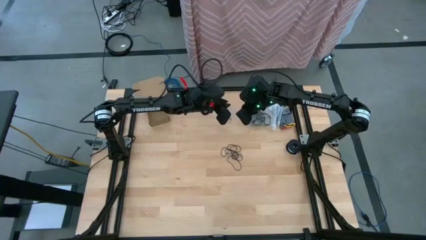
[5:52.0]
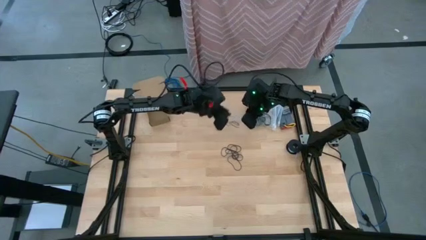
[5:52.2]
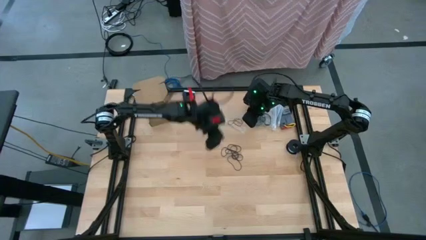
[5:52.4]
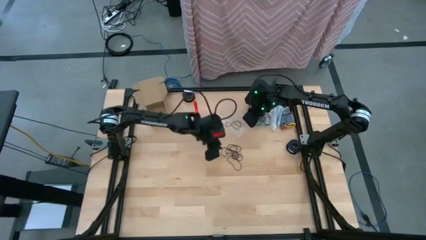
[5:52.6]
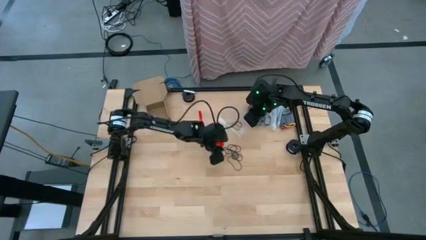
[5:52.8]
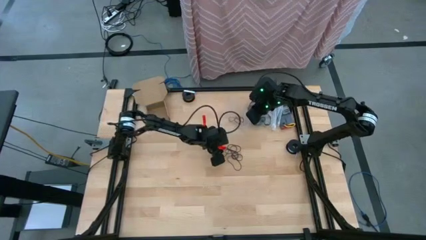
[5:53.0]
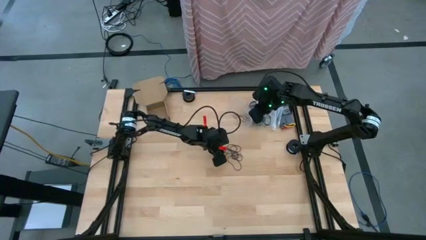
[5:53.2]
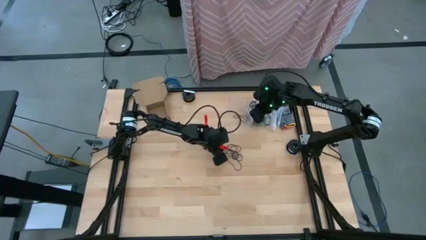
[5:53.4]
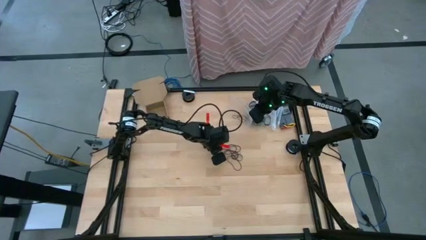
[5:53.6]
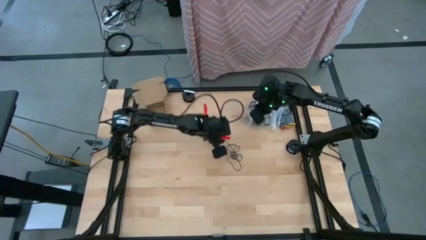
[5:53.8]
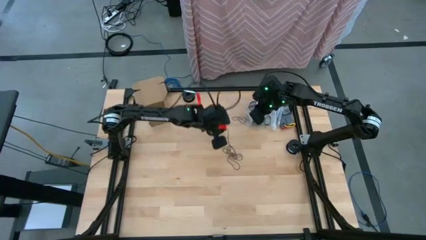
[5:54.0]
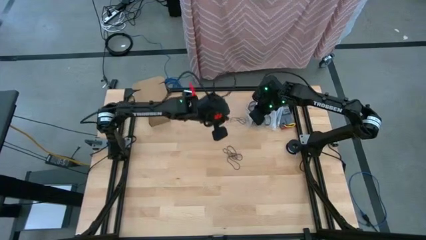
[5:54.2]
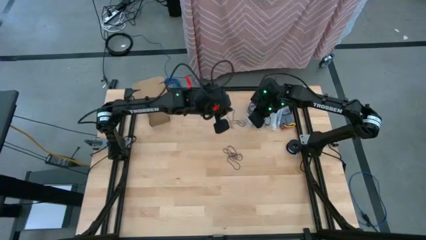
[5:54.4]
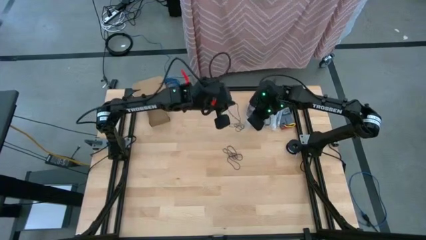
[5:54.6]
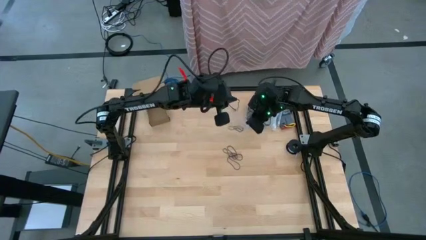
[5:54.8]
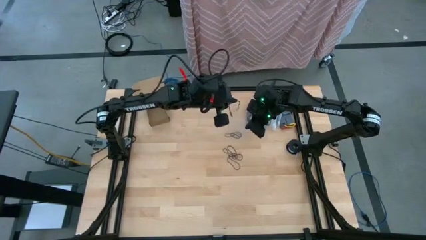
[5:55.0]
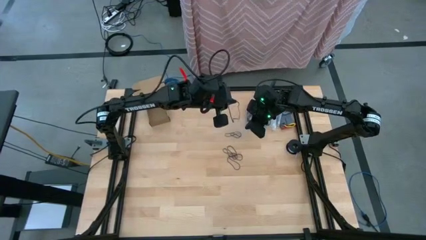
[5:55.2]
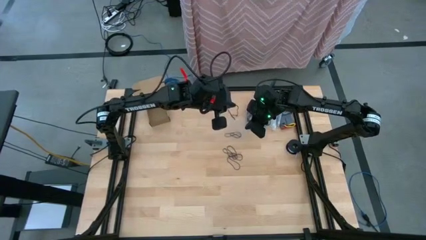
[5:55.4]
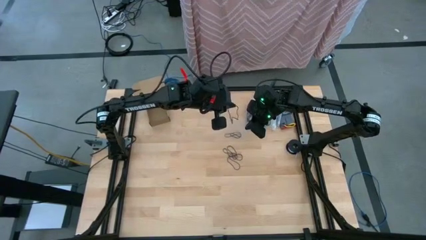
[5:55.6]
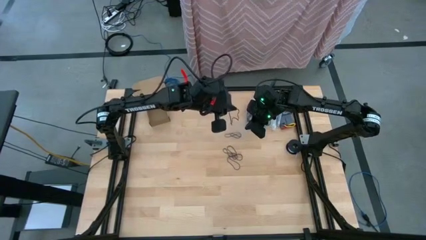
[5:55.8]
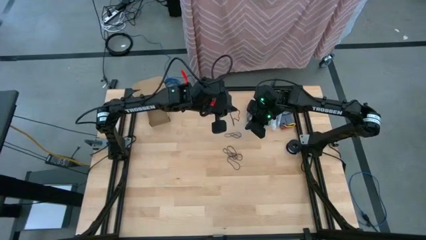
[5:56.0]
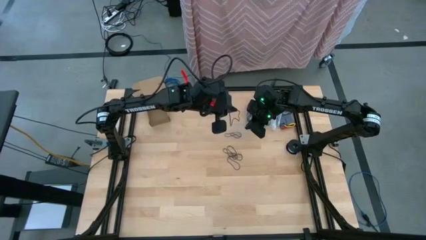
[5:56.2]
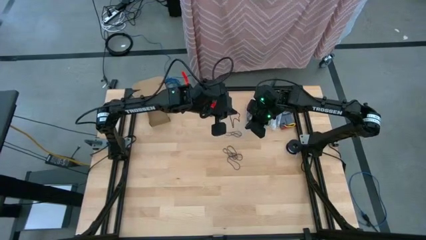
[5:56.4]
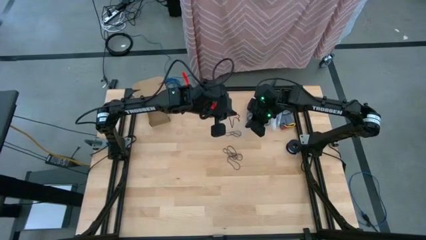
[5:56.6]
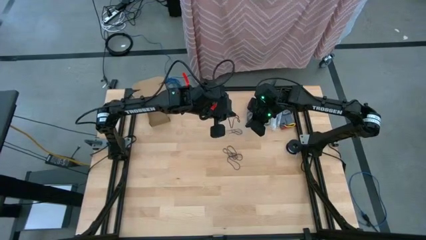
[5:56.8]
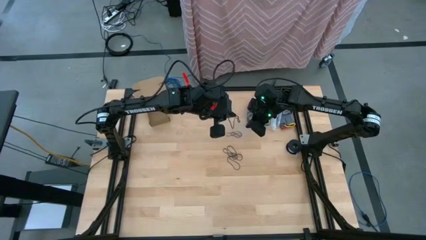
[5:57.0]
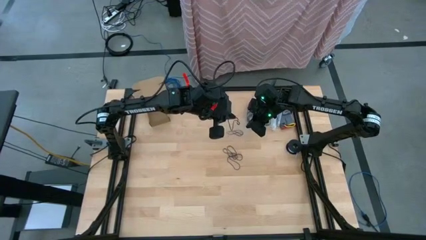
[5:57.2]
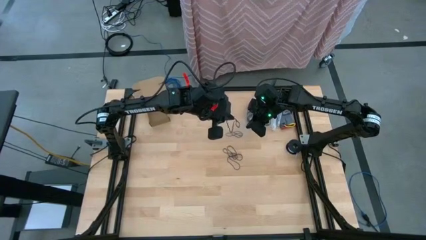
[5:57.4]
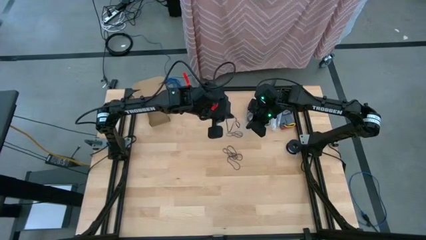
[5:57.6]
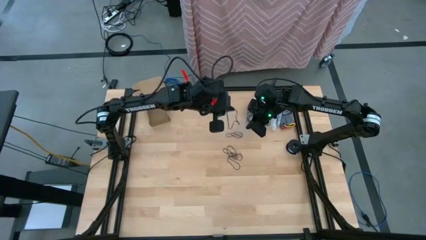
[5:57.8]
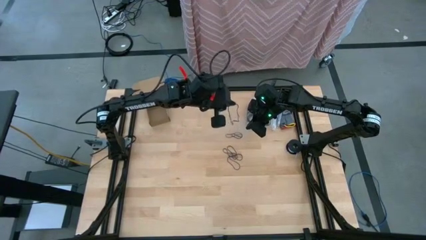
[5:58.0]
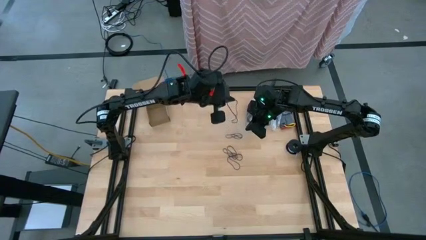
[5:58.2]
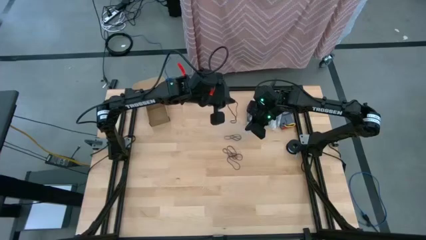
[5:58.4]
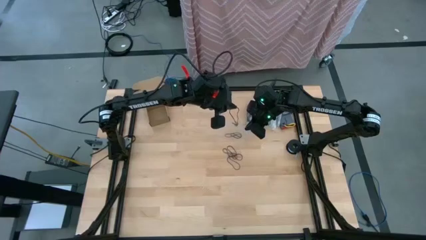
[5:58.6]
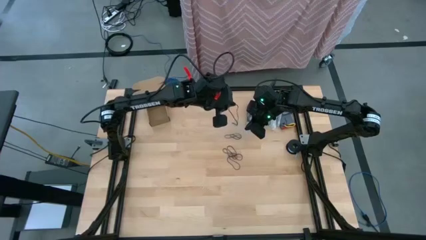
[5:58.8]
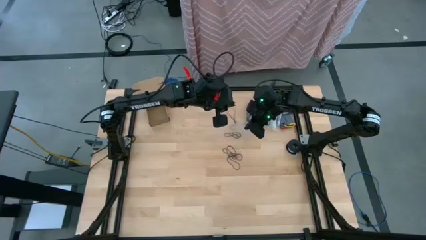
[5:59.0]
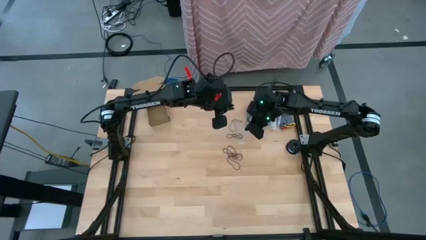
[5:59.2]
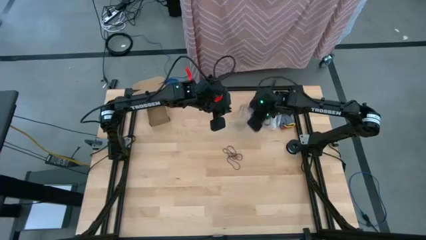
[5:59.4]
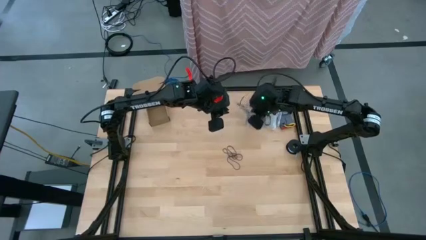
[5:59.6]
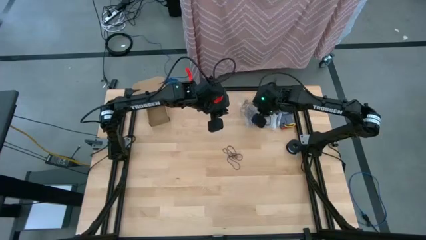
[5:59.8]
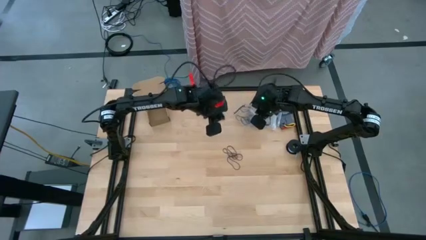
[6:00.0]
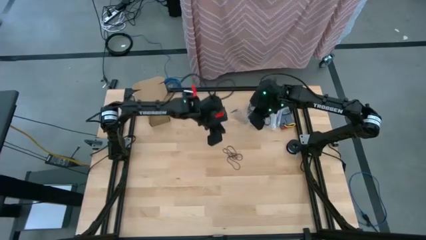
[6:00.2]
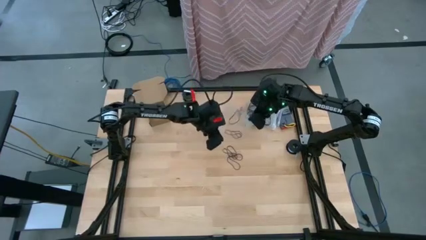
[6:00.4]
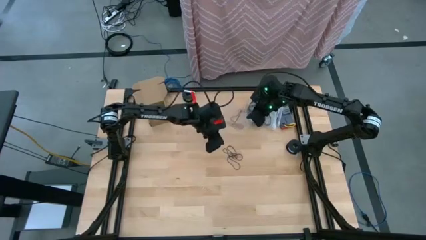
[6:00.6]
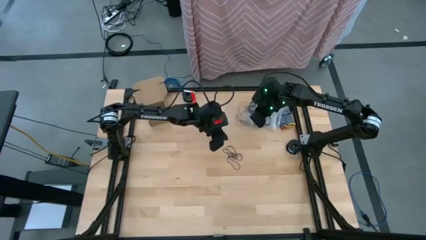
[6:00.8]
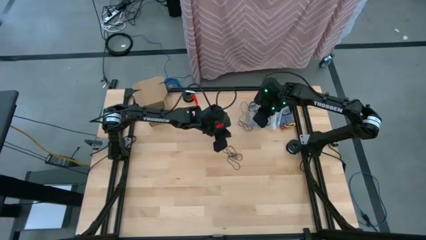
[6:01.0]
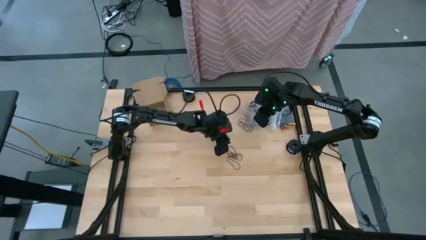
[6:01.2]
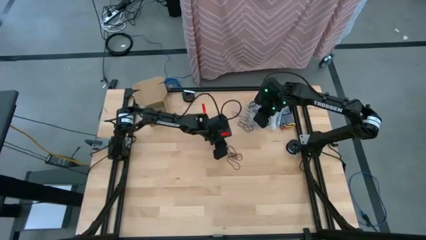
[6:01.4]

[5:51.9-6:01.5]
Task: Sort rubber bands
Put the black rubber band into the transparent zip bag

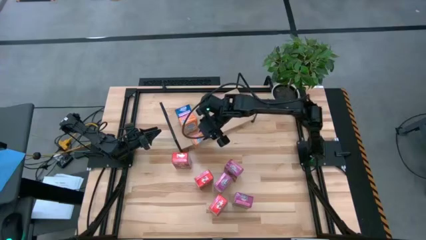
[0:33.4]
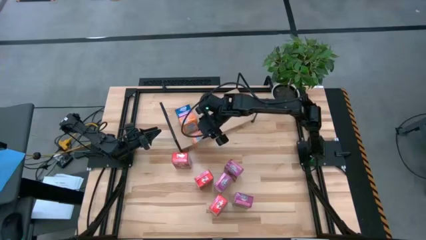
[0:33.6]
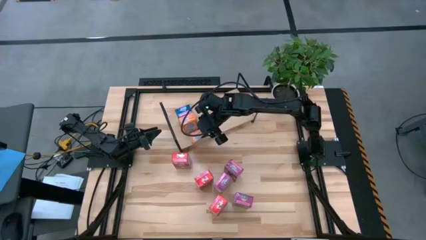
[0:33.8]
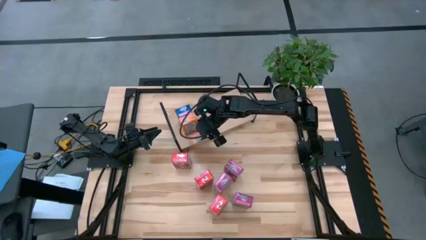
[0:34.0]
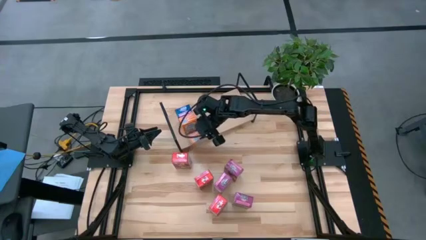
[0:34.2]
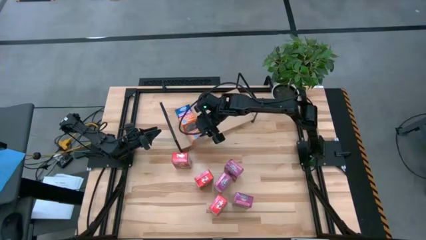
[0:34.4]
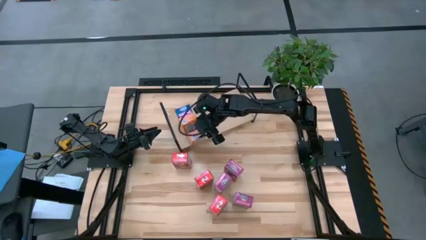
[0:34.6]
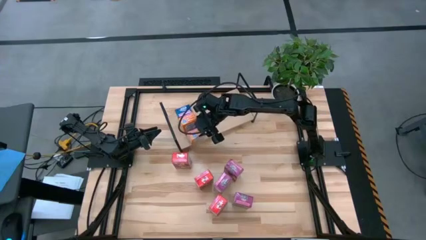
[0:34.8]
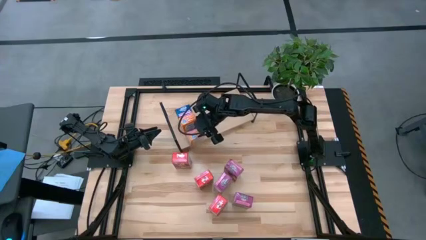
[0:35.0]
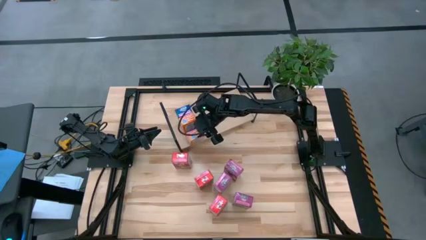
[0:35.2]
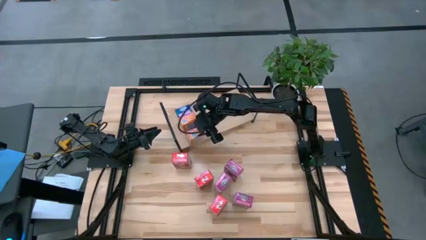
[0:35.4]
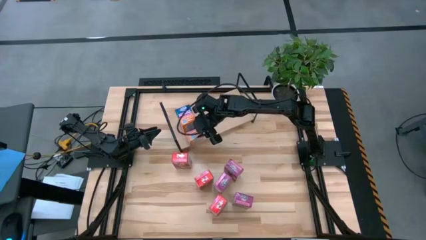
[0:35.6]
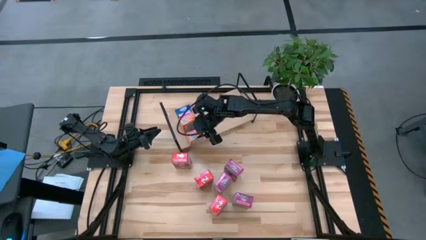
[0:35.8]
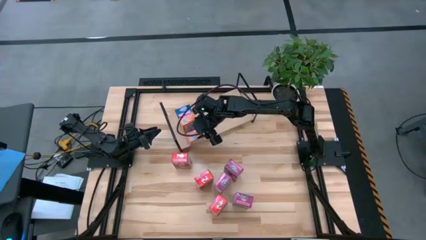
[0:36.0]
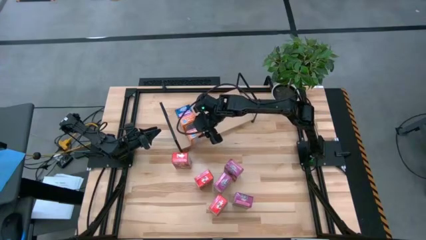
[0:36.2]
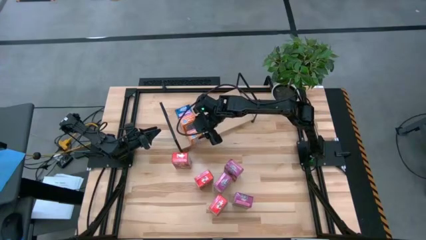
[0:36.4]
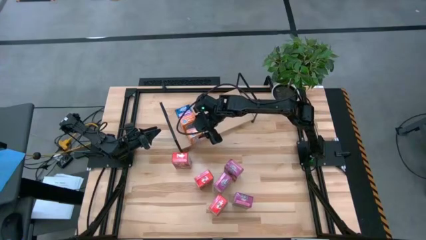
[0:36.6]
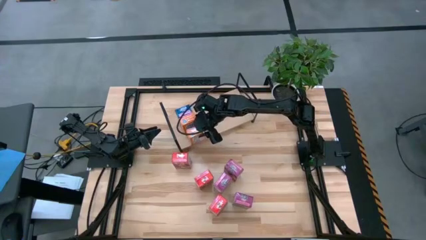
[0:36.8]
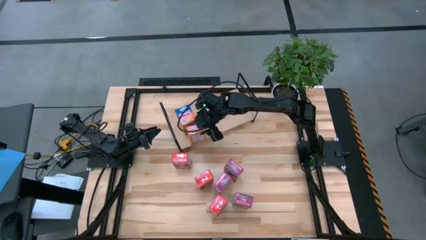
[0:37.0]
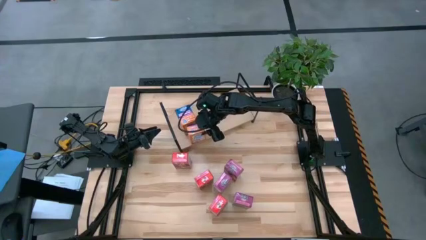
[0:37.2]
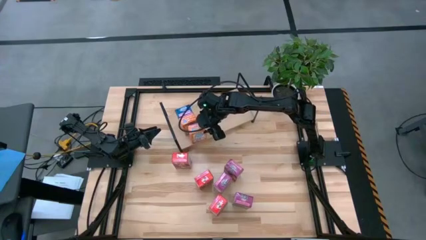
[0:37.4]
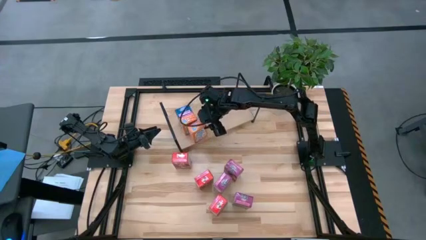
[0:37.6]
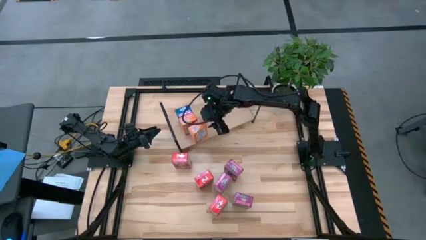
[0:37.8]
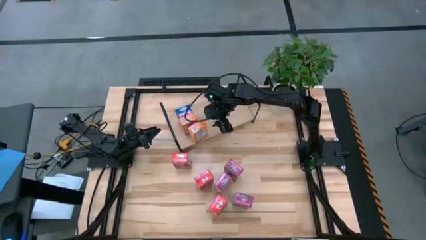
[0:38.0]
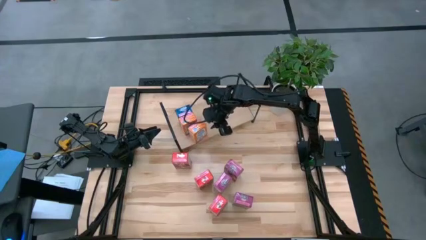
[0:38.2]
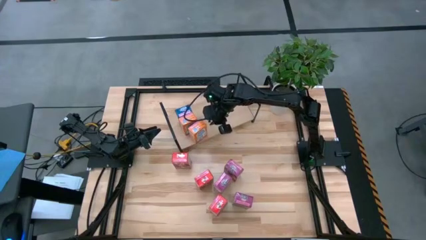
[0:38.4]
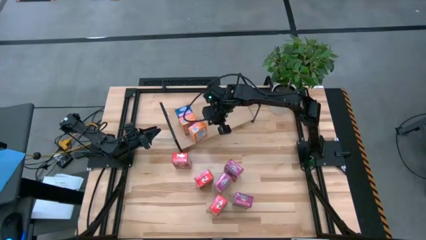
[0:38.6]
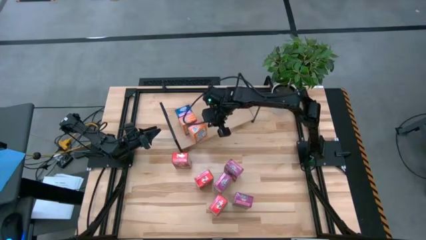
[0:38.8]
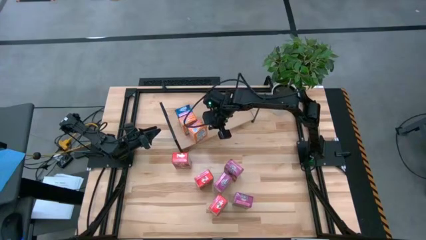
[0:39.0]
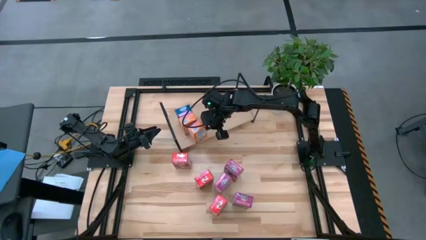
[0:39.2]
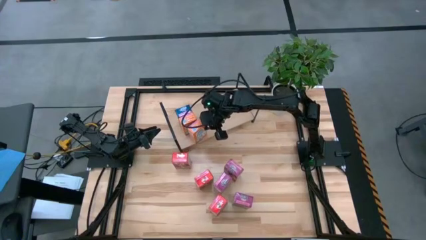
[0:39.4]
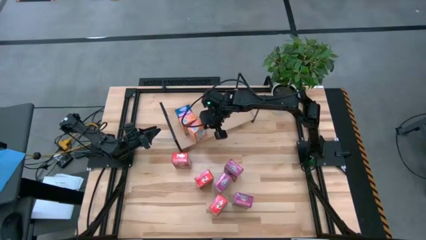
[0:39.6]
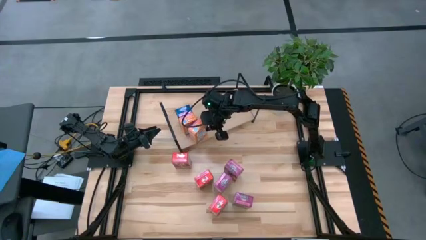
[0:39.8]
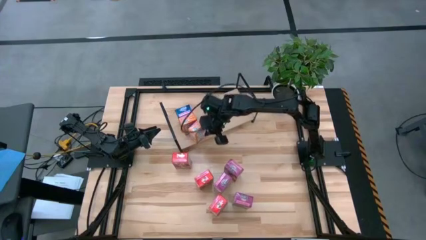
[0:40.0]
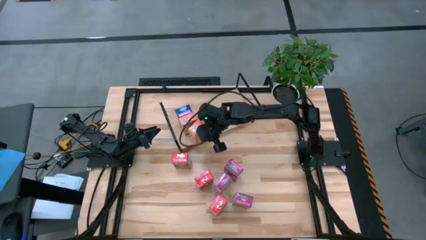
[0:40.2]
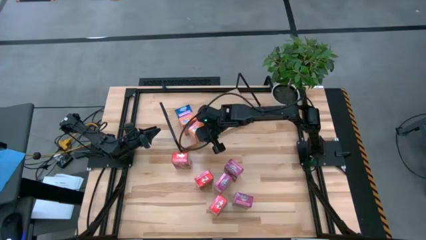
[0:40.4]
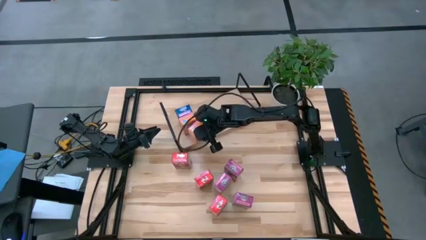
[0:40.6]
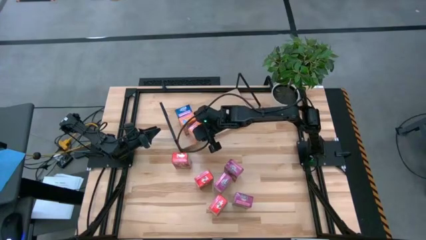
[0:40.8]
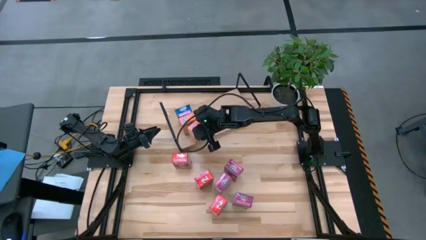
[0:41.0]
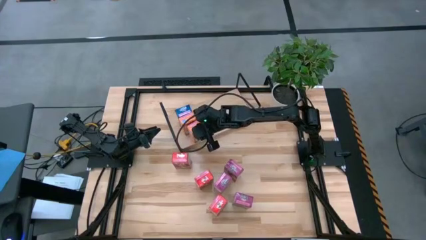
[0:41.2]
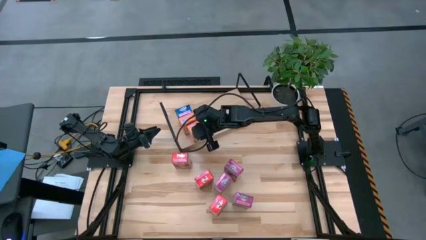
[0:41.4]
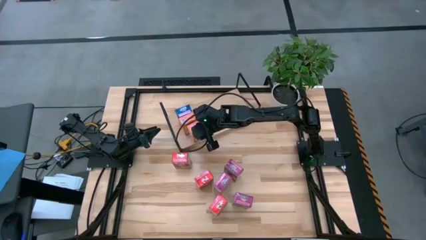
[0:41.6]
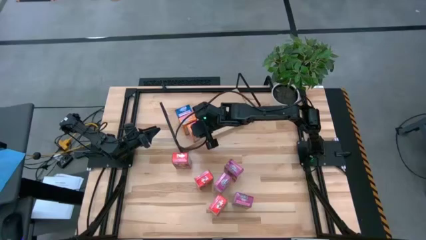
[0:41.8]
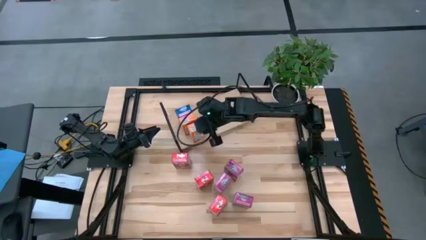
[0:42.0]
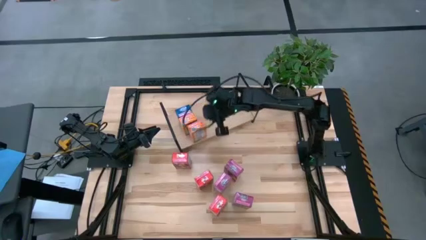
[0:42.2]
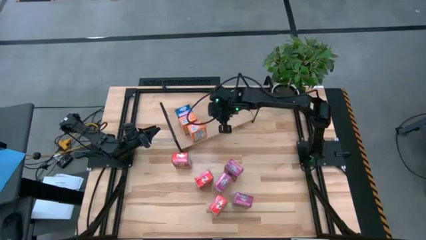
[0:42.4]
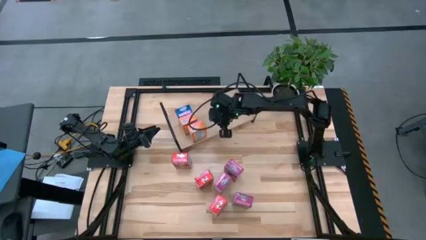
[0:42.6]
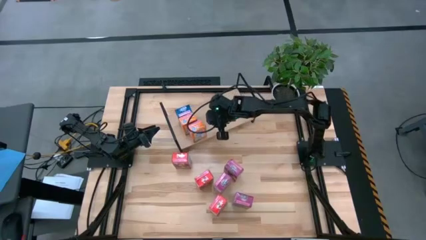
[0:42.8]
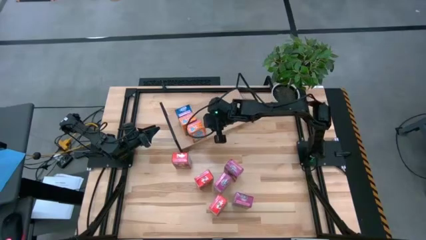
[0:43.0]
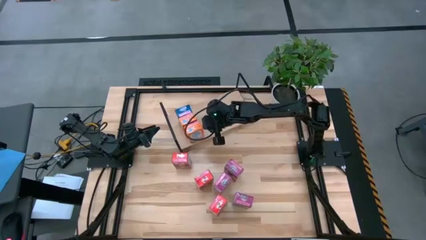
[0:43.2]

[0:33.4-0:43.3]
Task: Stack cereal on shelf
Put the orange cereal box on the shelf aligned with the other orange cereal box
